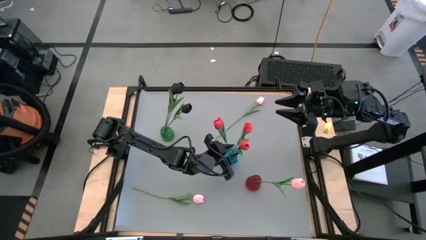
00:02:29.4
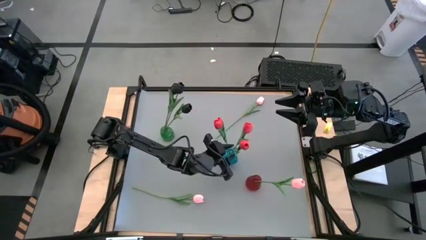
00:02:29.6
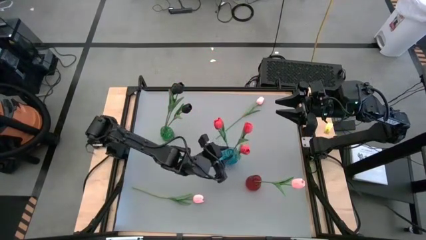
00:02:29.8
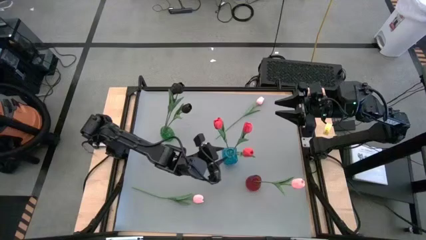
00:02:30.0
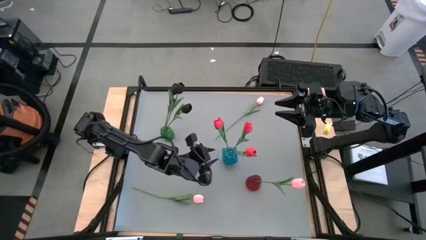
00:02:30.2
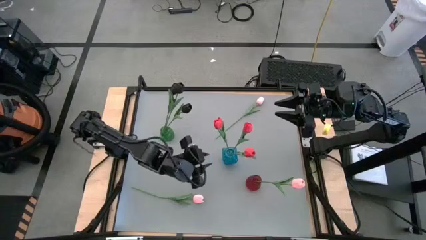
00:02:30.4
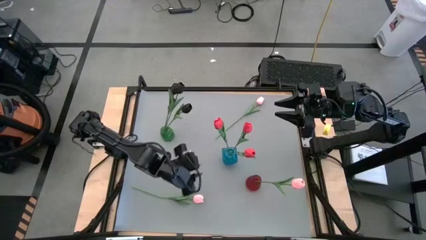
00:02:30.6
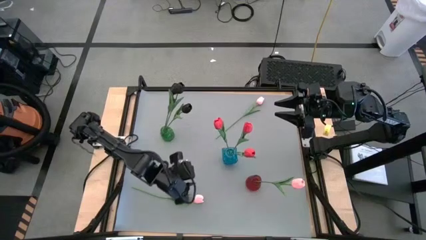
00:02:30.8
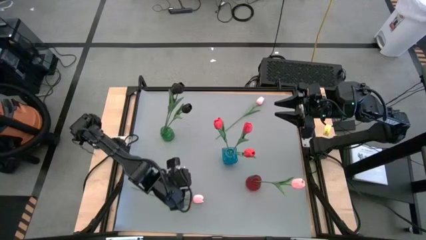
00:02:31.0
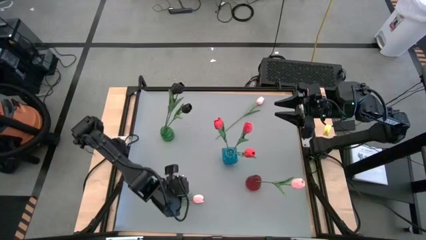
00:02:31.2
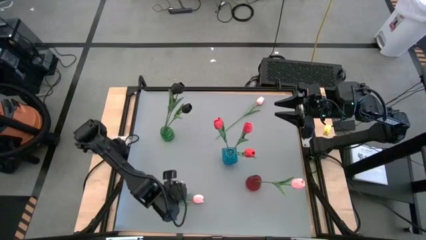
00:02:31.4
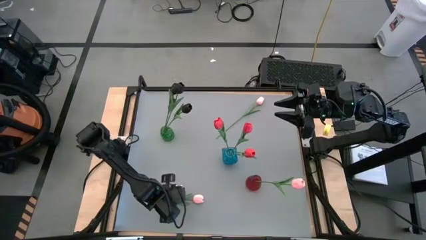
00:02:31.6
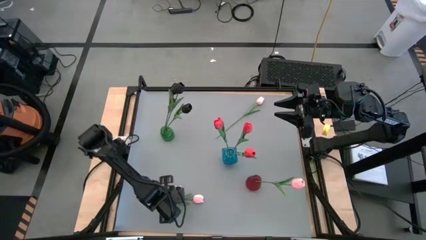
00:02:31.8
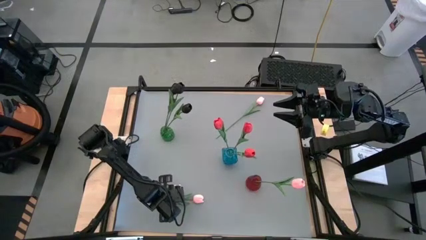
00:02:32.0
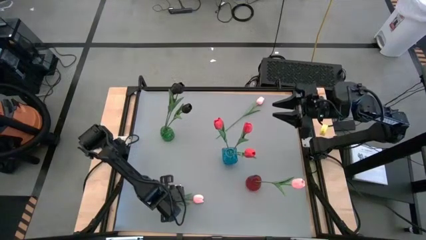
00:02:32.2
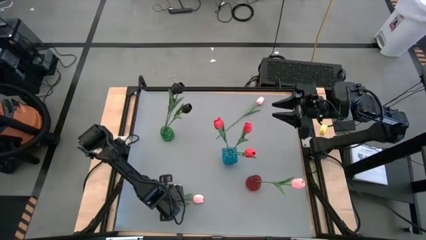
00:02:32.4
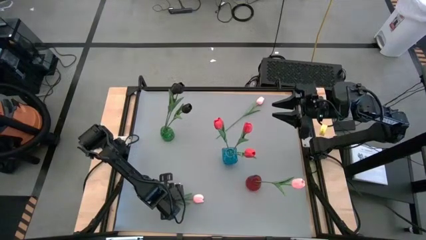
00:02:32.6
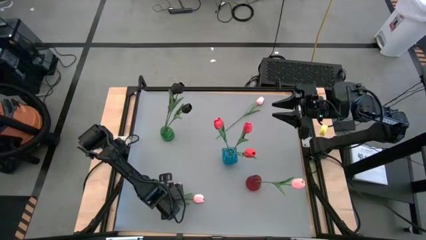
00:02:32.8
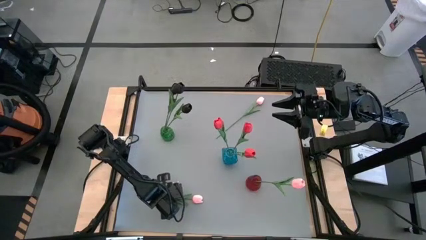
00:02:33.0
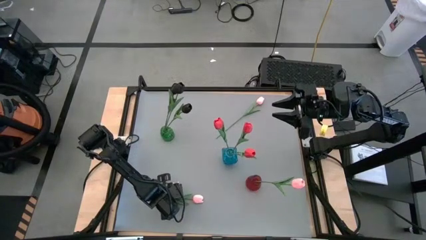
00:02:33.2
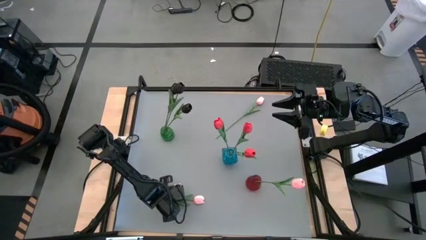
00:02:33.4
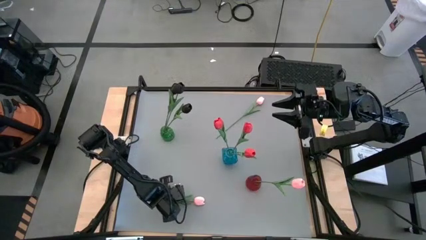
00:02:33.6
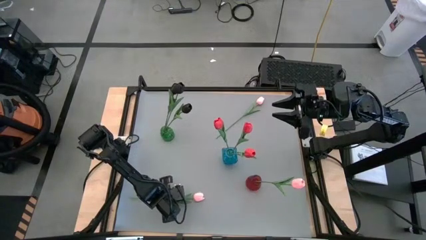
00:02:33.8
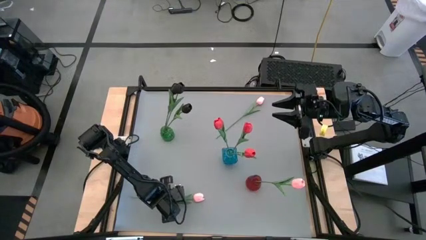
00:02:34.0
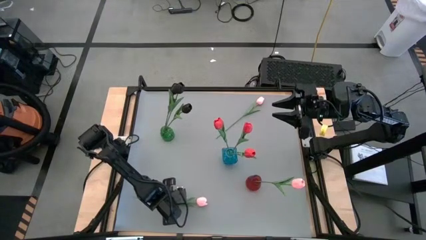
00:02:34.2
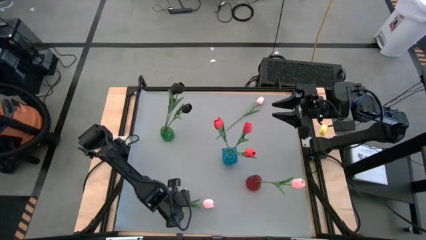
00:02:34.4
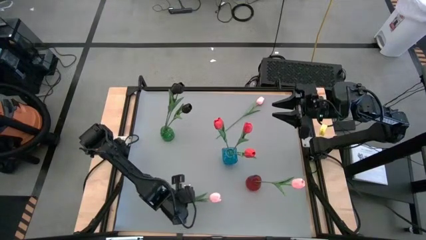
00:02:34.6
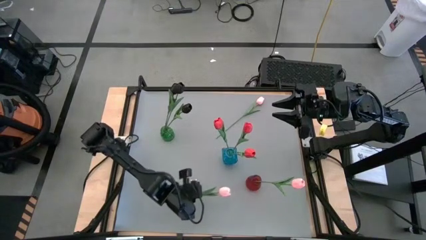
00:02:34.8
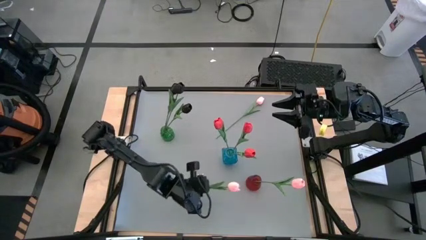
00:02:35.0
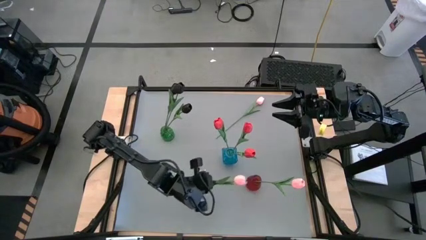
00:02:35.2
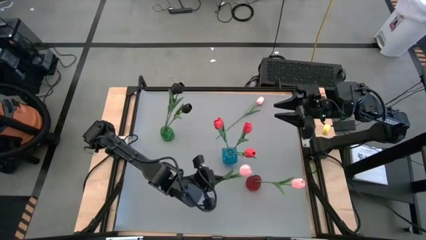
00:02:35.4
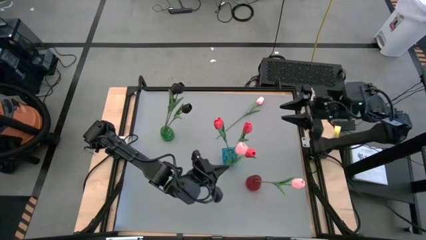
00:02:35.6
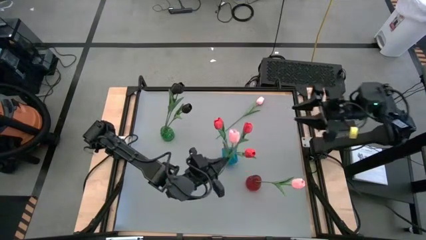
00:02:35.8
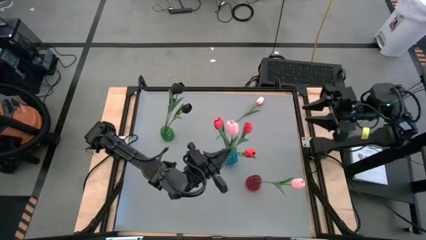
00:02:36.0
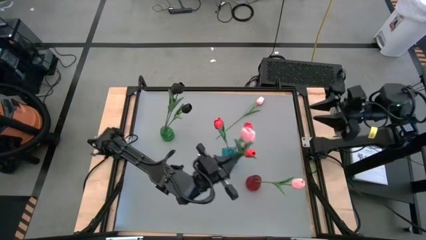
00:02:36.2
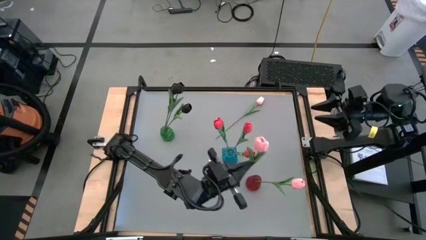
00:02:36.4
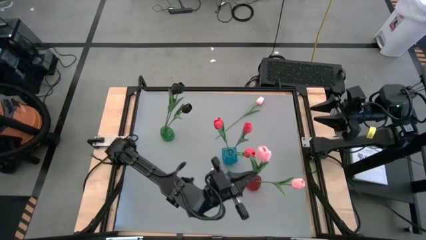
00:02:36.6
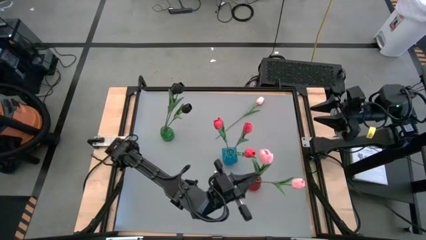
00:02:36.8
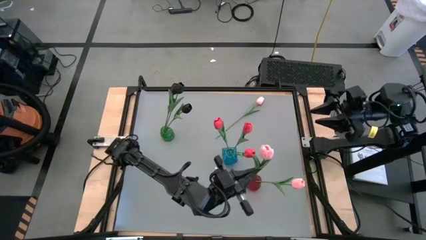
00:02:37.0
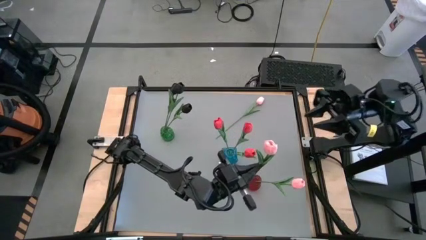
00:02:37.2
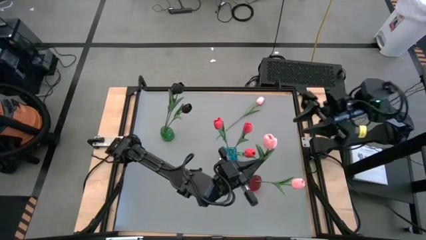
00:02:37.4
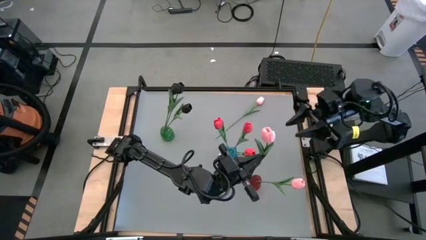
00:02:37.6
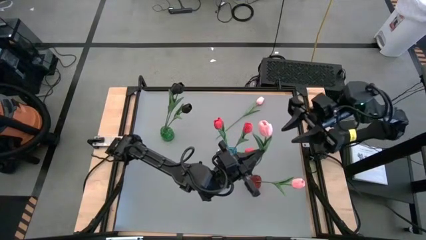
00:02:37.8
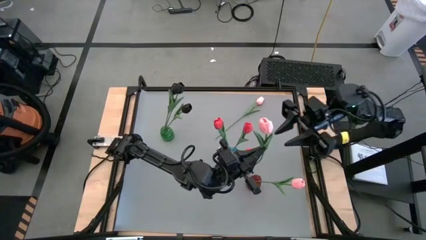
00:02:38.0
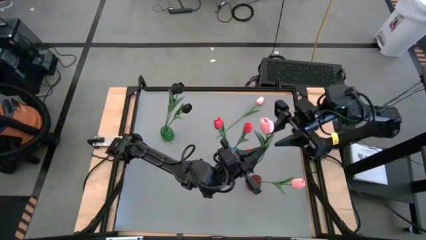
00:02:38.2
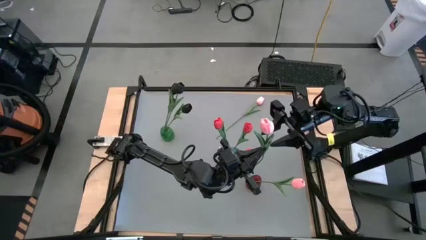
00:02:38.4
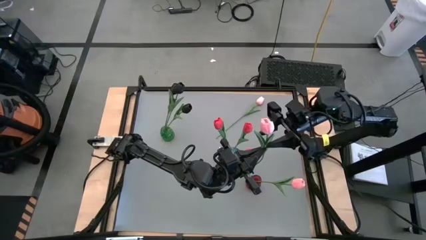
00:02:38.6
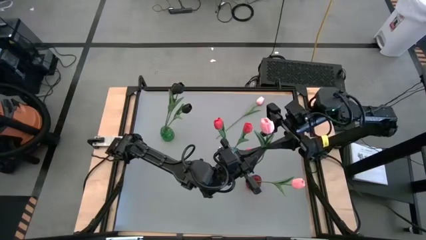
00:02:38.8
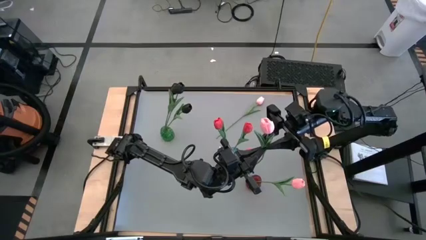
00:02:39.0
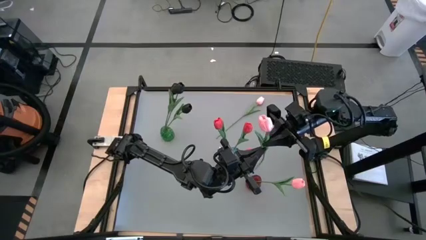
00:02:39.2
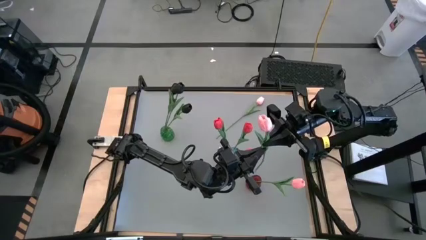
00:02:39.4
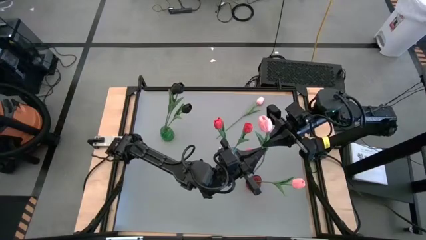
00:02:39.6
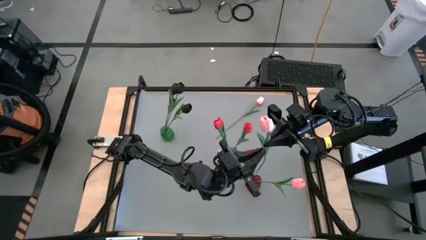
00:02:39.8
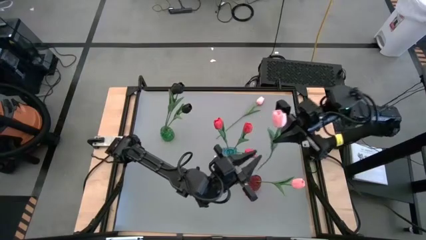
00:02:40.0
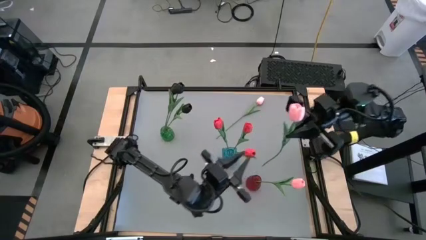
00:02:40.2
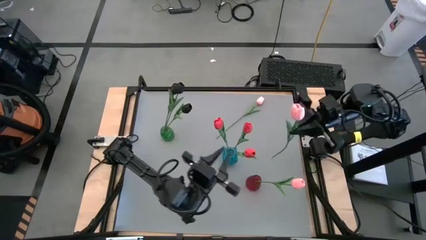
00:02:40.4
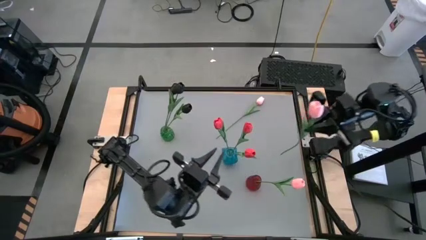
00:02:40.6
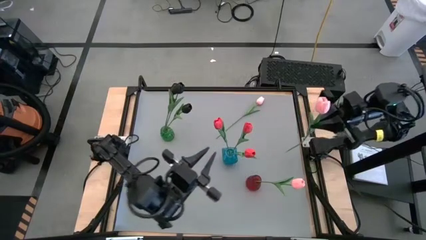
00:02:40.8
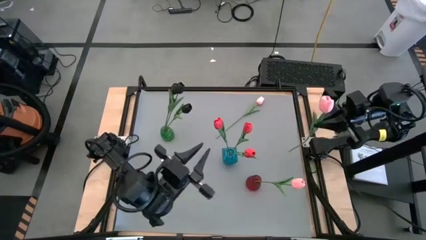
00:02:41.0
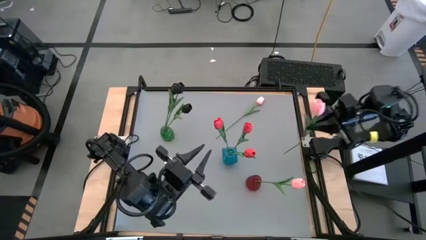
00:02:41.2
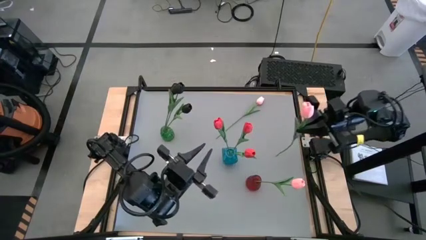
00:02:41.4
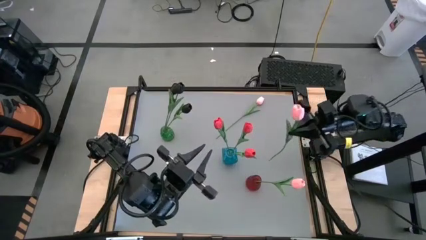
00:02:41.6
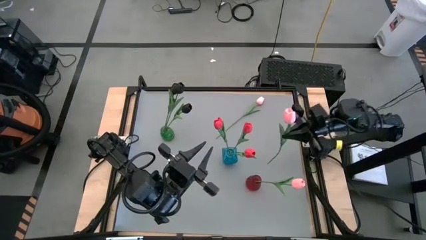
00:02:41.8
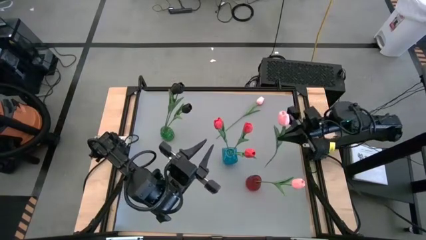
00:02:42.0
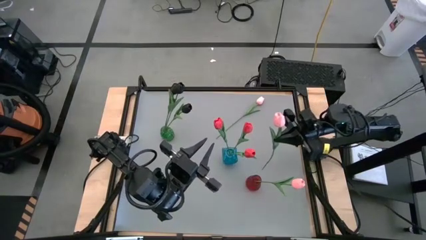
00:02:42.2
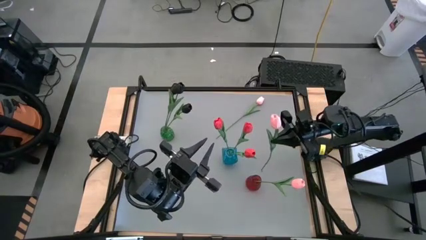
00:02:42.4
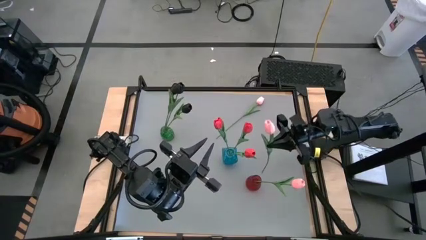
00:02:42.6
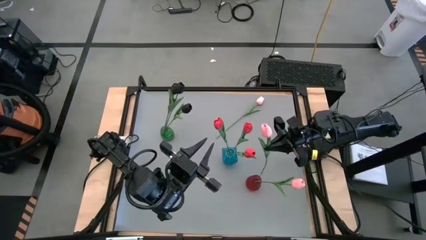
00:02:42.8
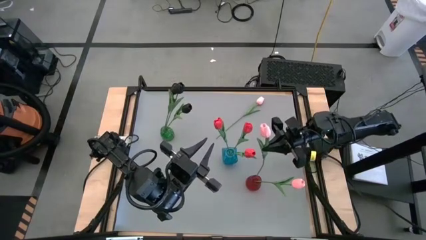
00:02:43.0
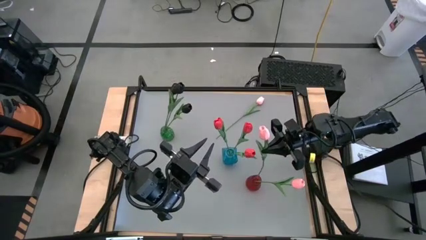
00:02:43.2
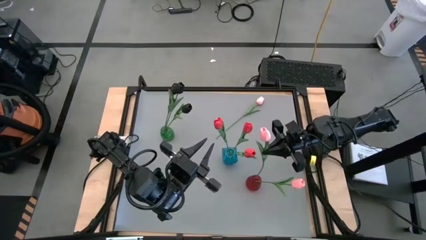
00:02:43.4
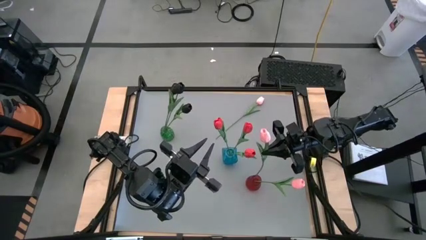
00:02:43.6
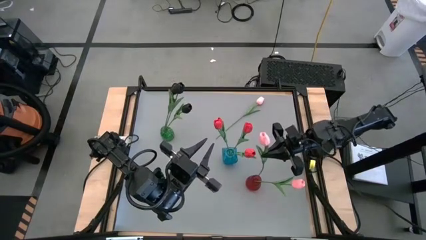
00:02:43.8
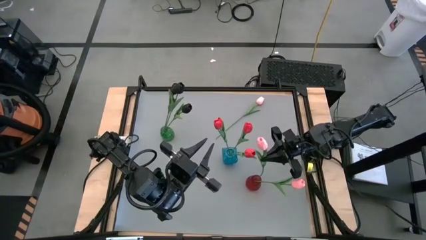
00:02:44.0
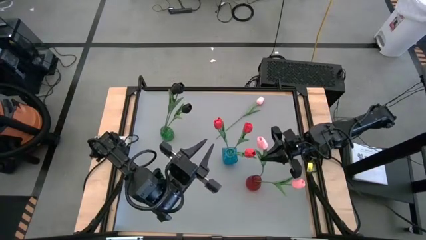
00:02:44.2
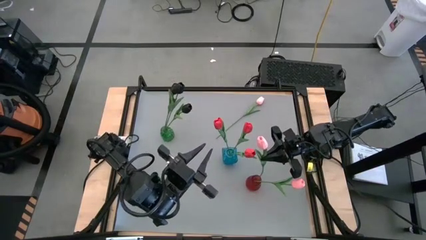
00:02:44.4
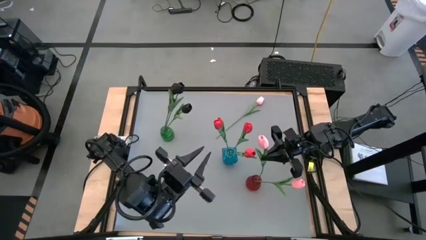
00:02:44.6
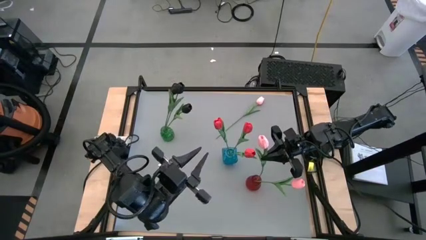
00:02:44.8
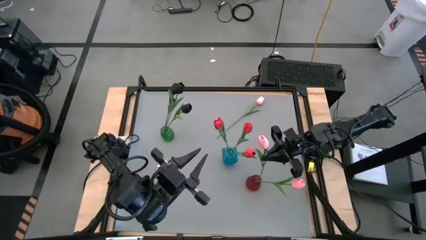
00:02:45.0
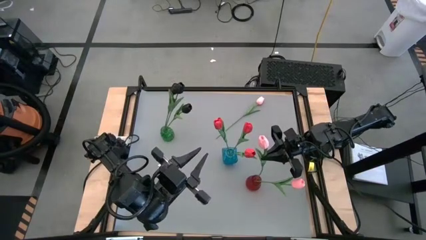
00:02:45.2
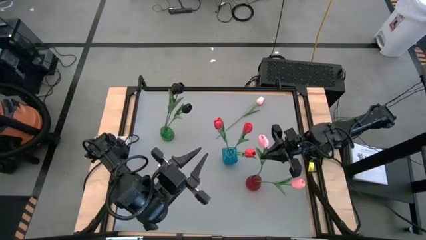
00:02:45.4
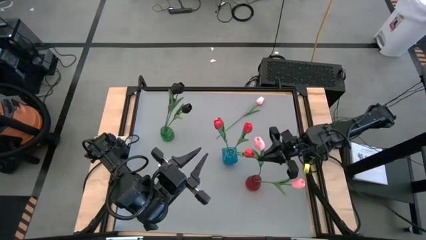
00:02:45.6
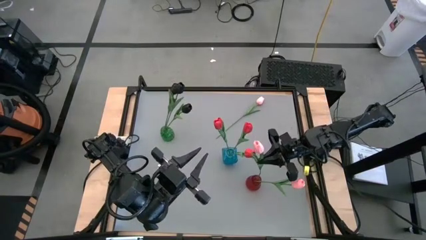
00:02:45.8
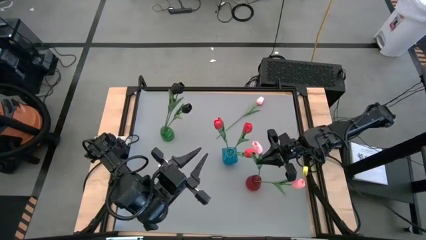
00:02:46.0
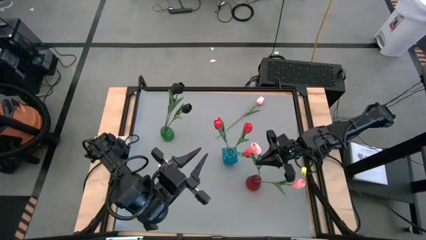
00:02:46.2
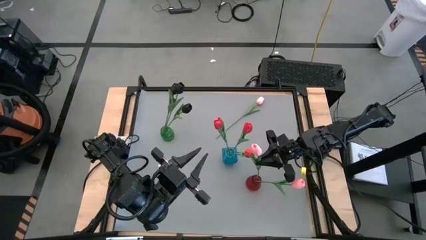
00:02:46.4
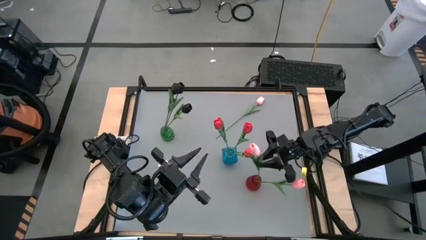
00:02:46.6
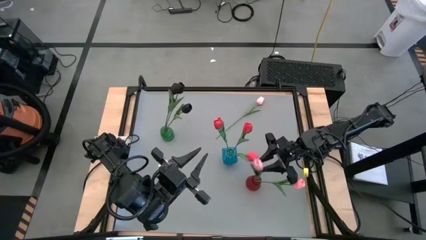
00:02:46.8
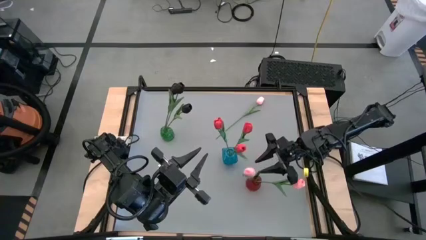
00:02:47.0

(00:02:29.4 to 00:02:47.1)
Task: Sort flowers into vase by color
Put the bottom pink tulip into the red vase
